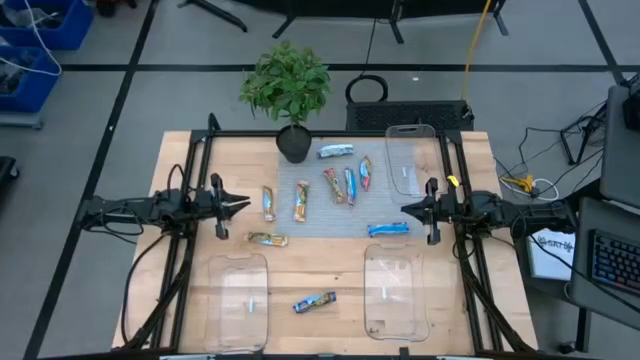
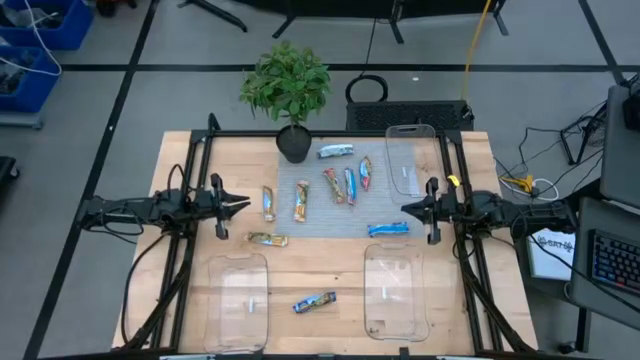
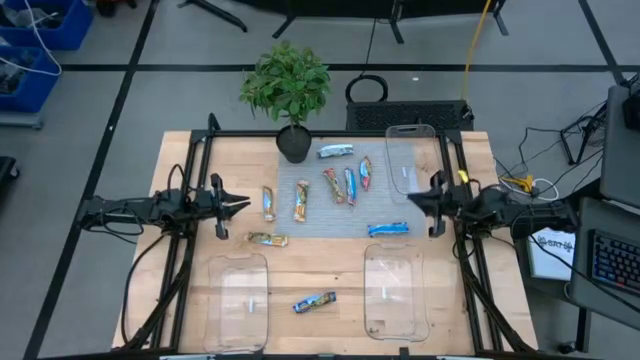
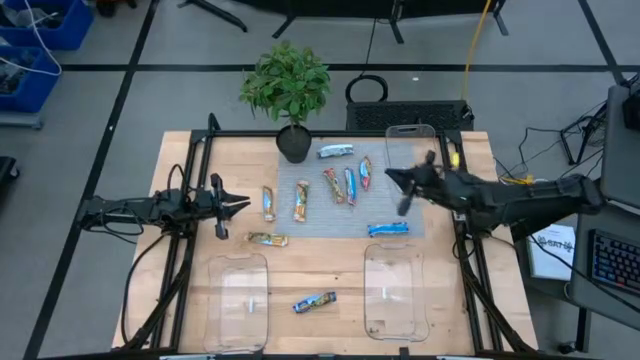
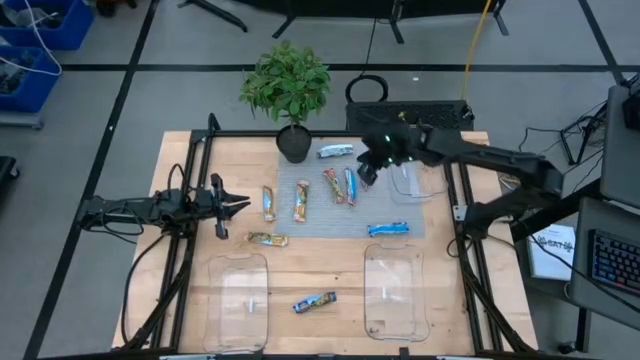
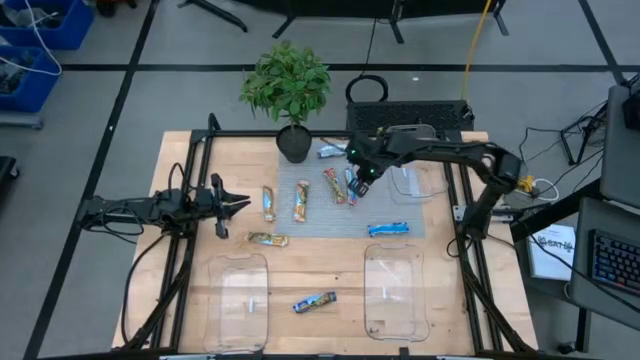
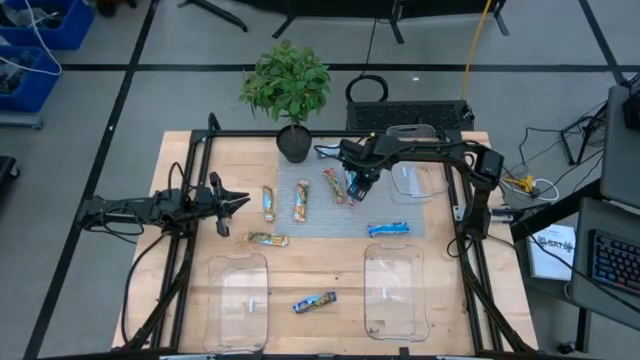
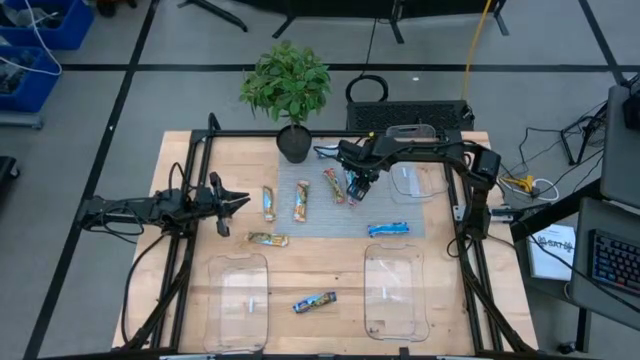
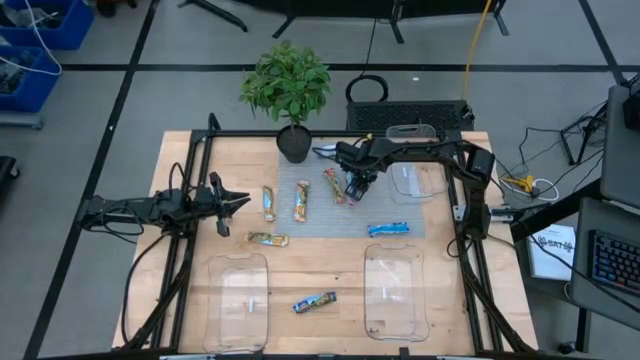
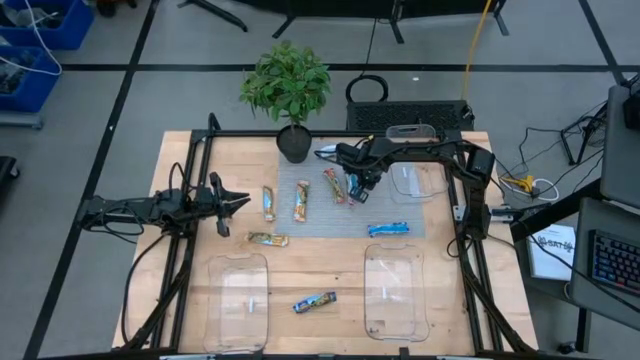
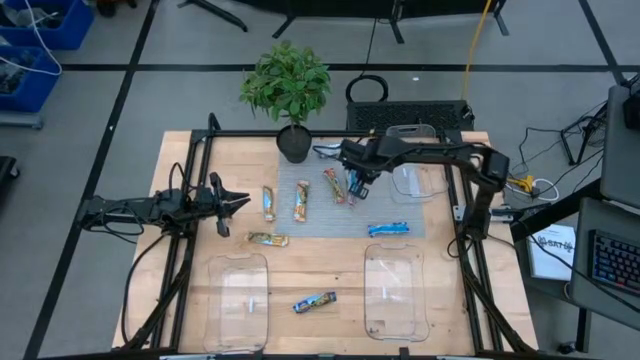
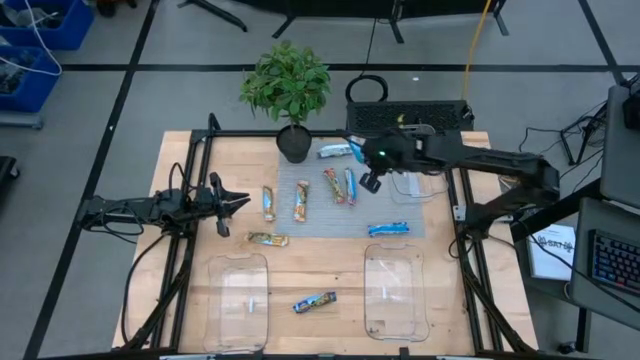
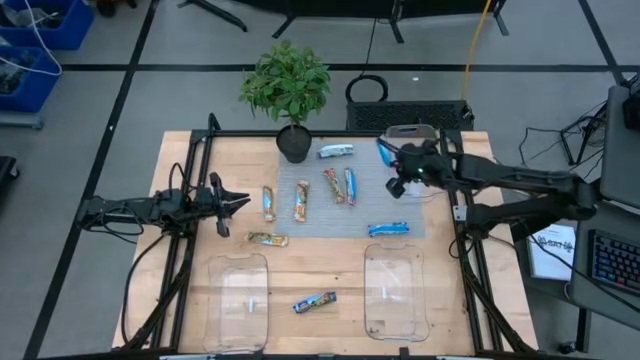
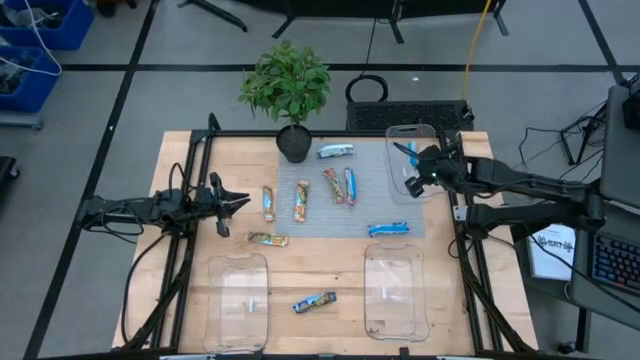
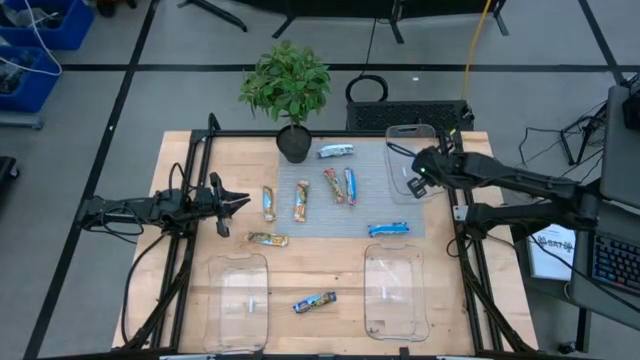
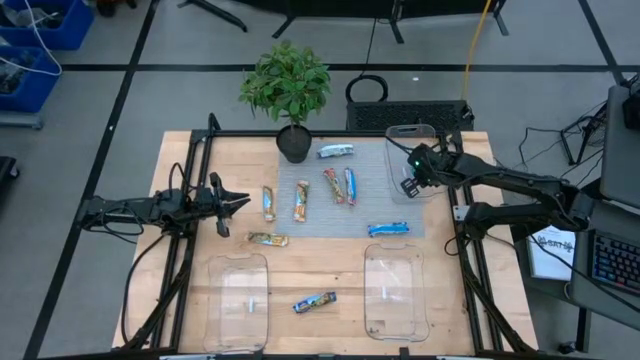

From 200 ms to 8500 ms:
Task: Pick and place Granola Bars by type
Put the right red granola bar into the top transparent bin

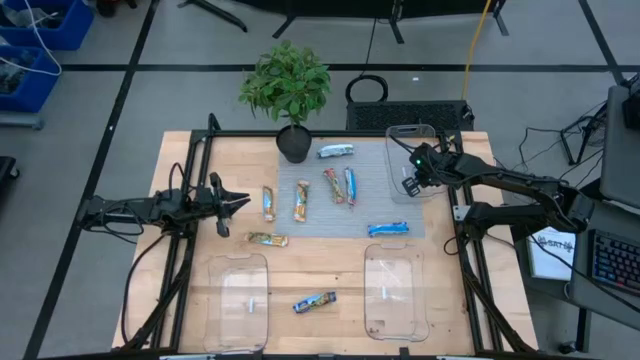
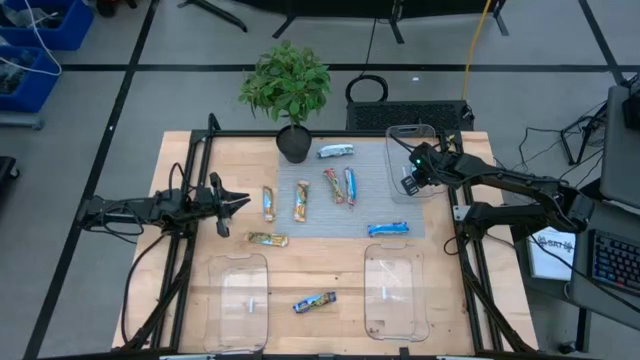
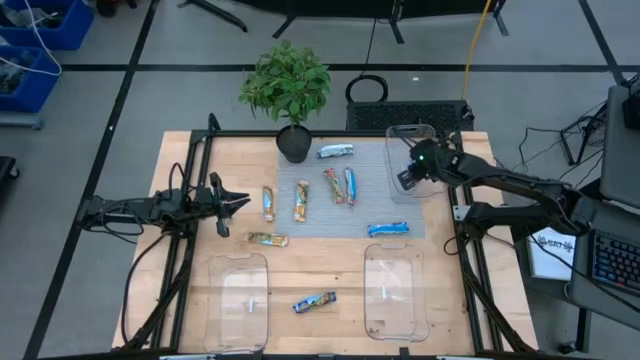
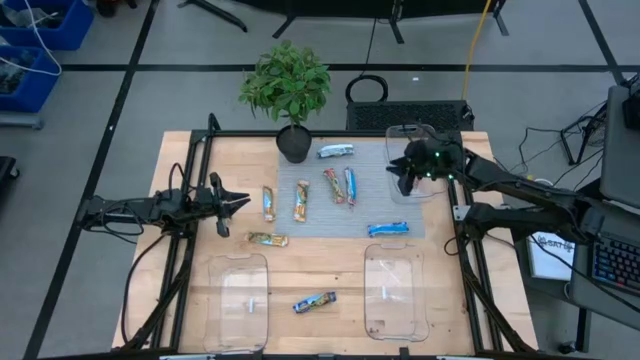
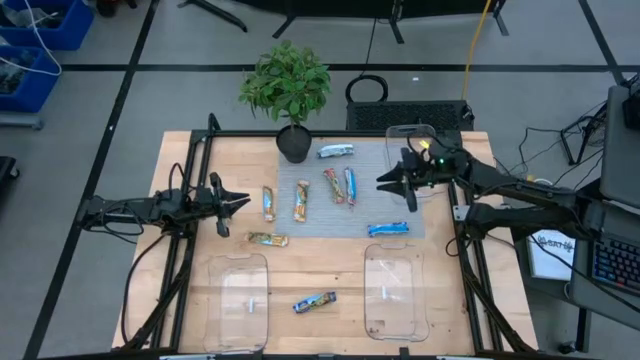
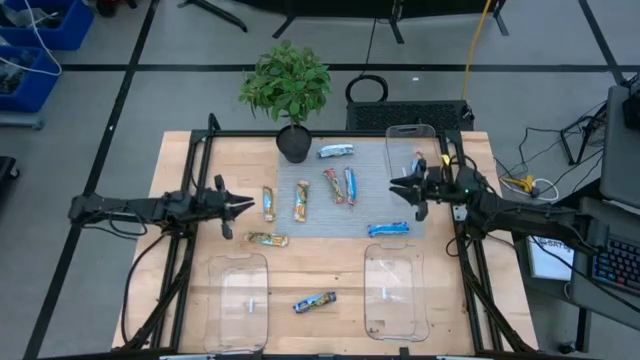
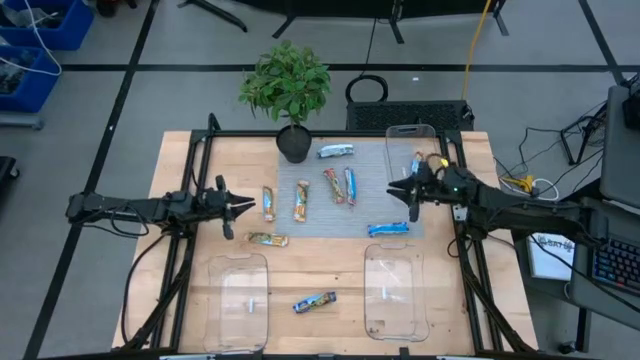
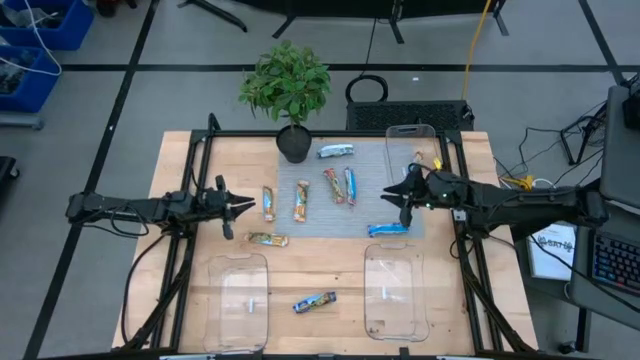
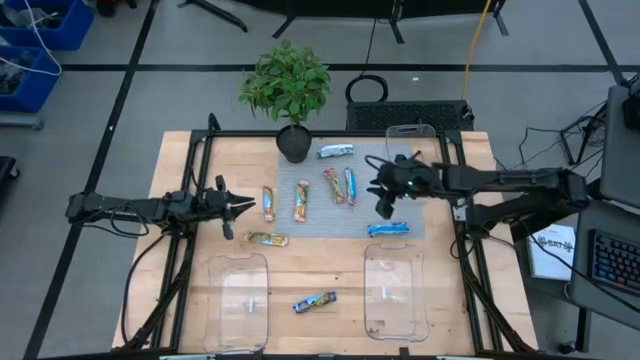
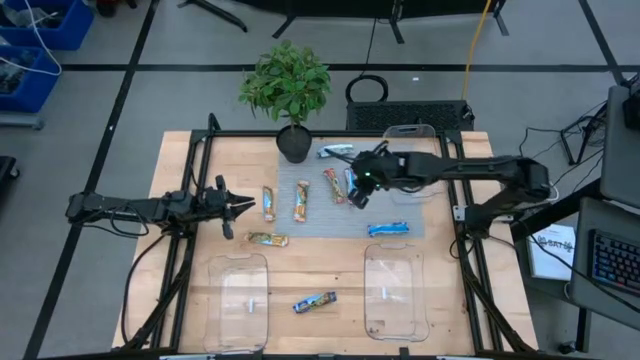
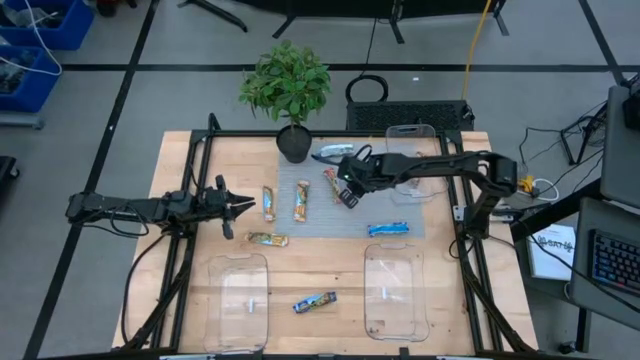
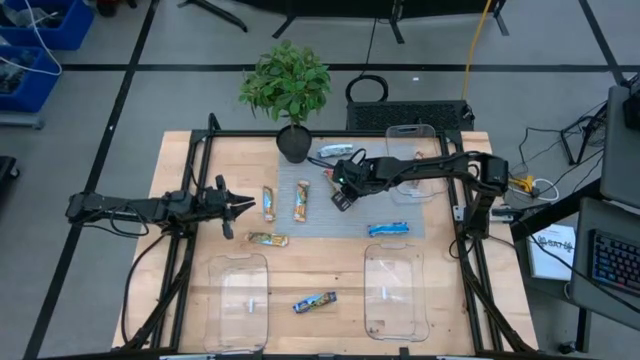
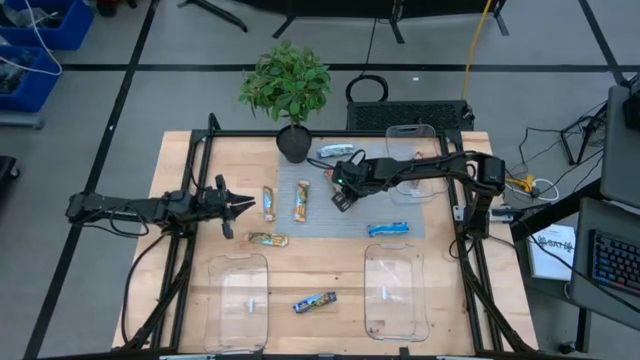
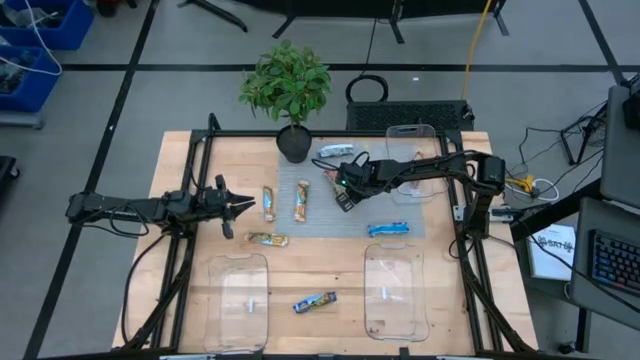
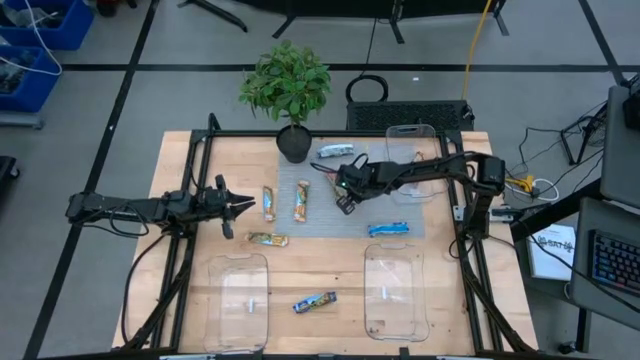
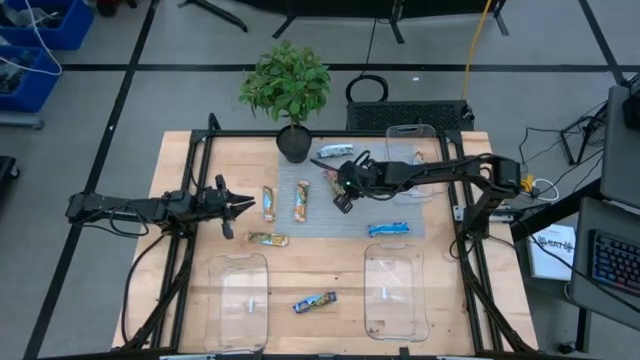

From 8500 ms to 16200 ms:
Put the right red granola bar into the top transparent bin

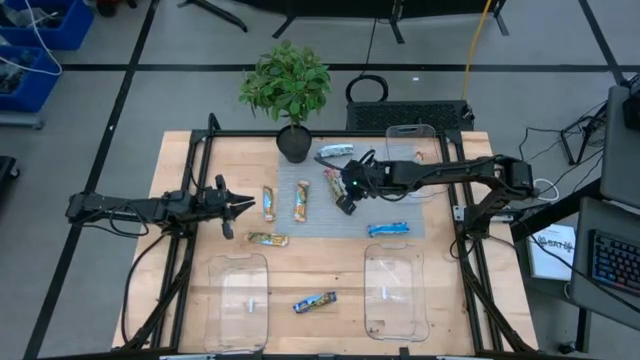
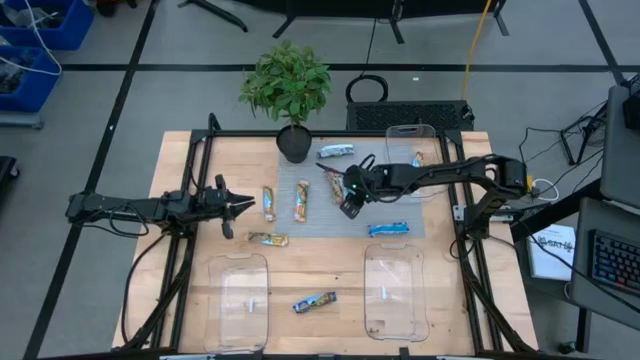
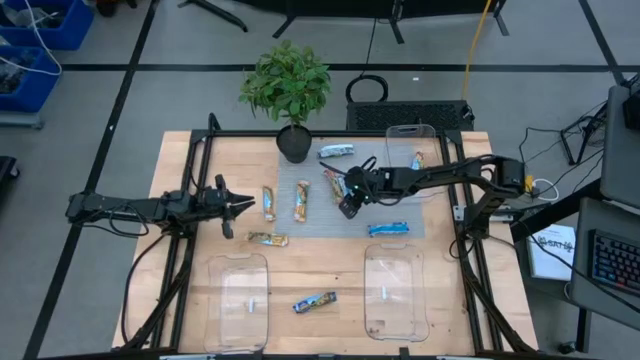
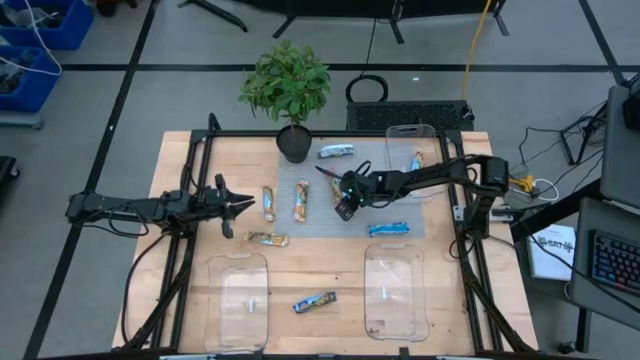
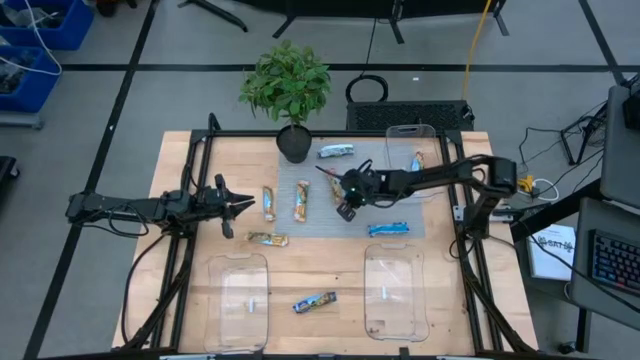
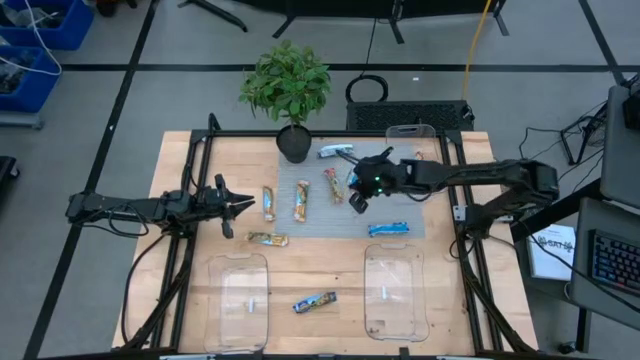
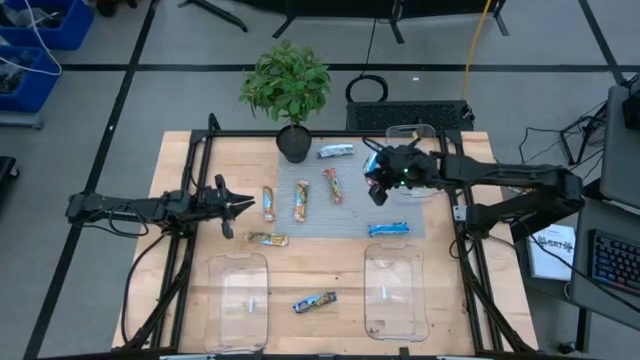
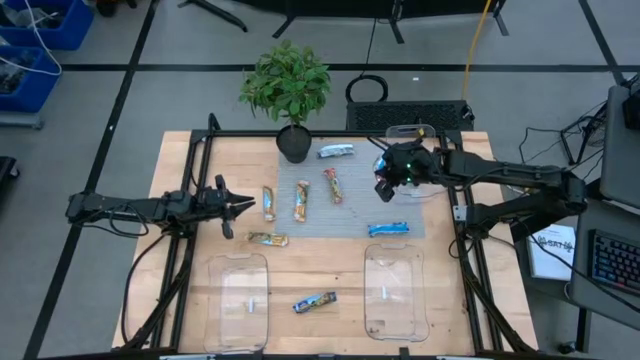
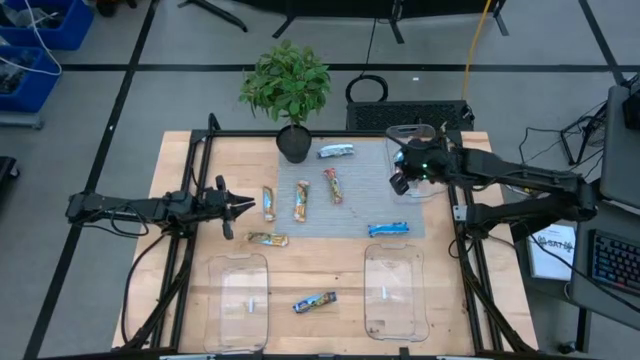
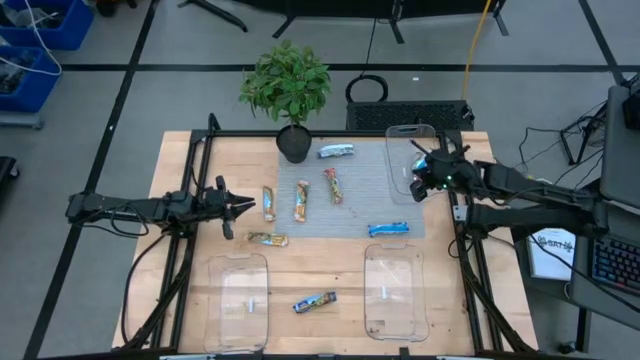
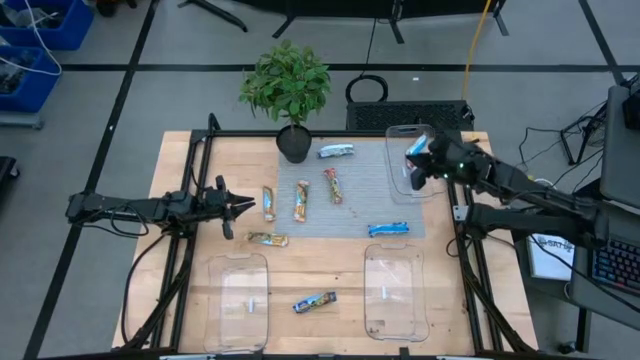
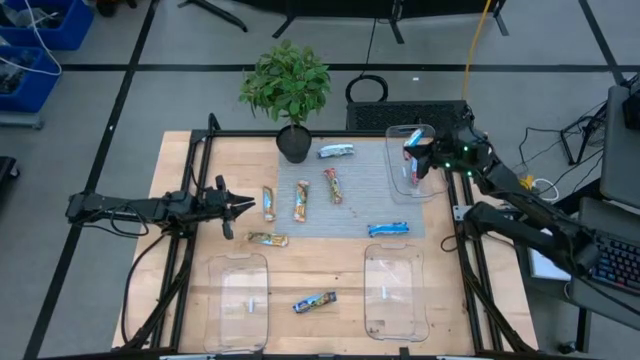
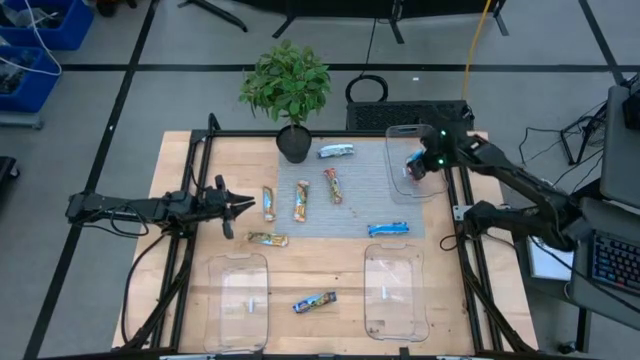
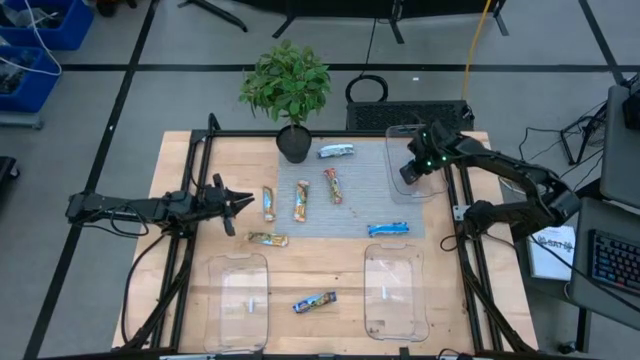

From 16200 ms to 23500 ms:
Put the right red granola bar into the top transparent bin
